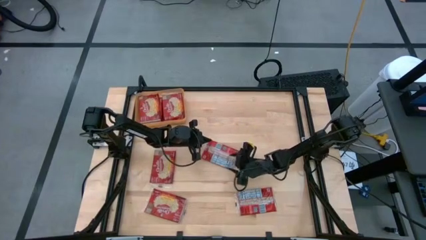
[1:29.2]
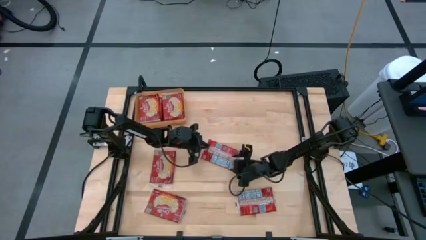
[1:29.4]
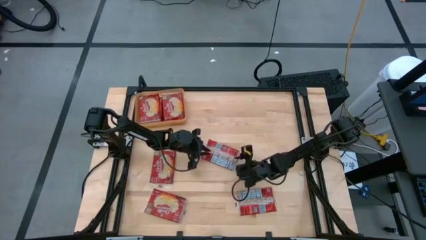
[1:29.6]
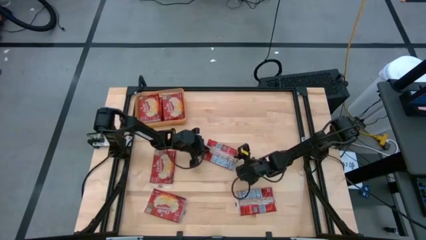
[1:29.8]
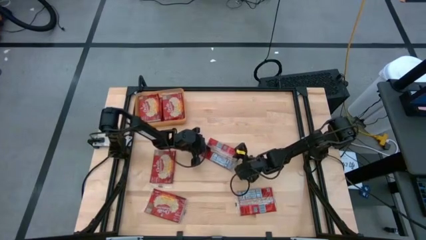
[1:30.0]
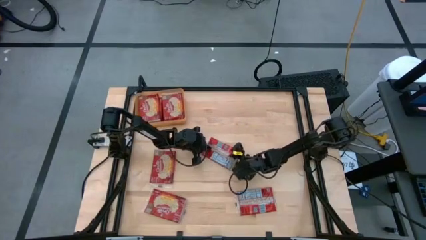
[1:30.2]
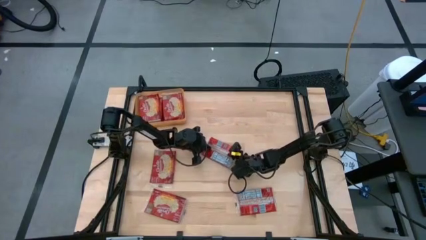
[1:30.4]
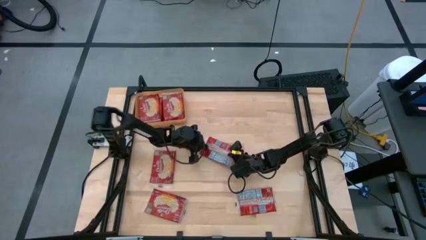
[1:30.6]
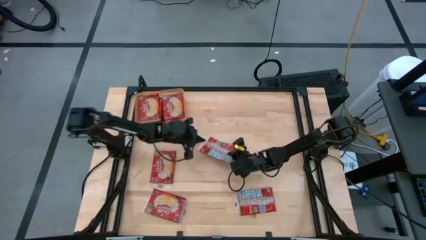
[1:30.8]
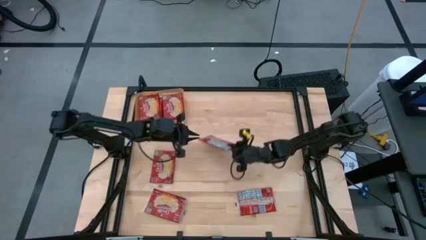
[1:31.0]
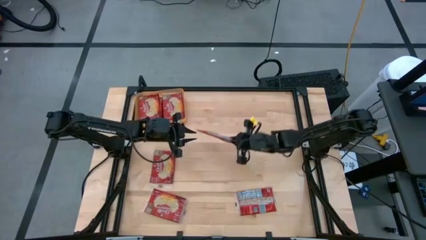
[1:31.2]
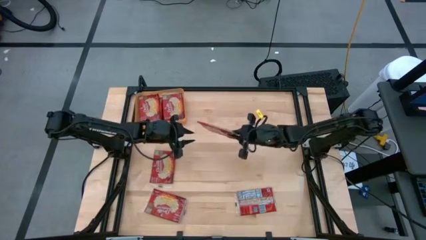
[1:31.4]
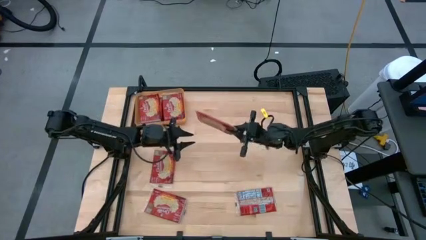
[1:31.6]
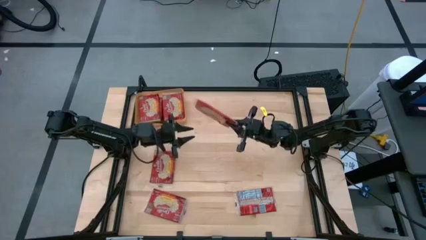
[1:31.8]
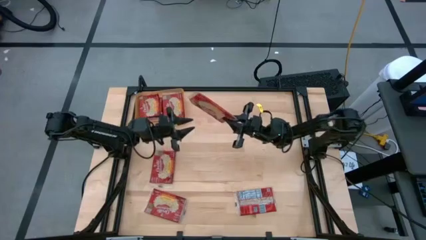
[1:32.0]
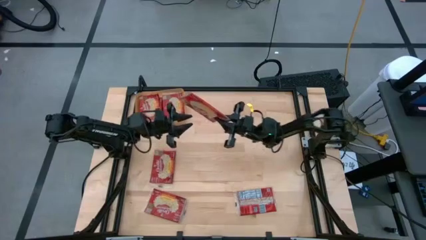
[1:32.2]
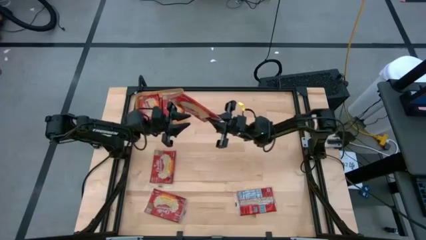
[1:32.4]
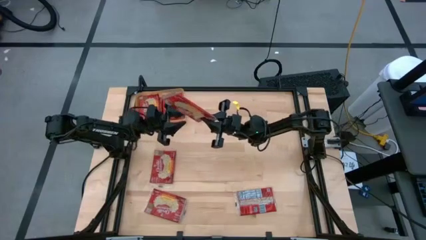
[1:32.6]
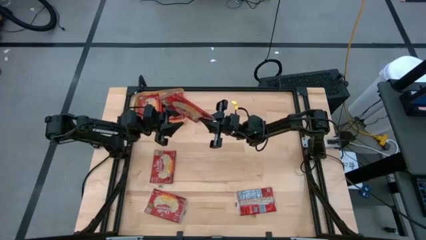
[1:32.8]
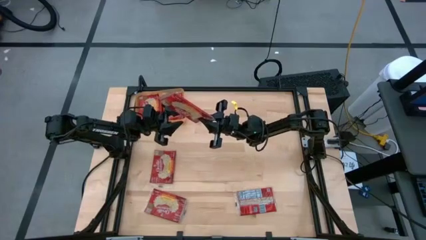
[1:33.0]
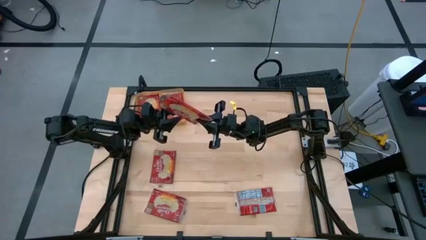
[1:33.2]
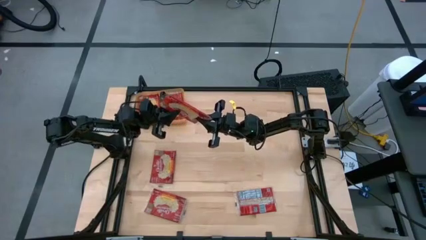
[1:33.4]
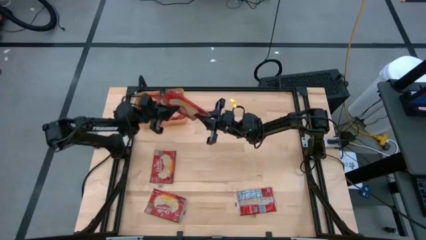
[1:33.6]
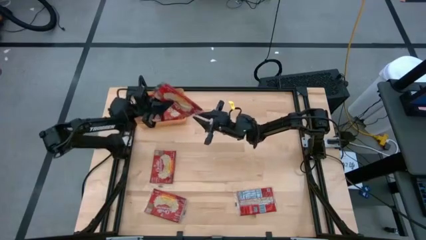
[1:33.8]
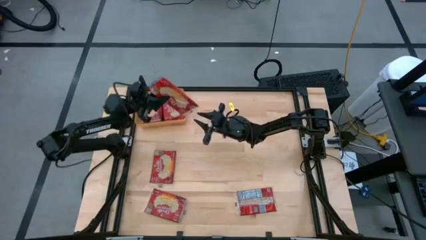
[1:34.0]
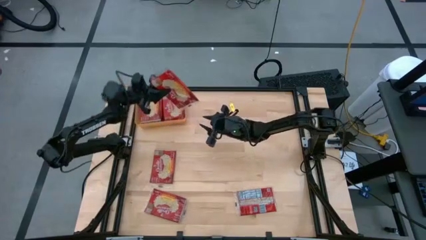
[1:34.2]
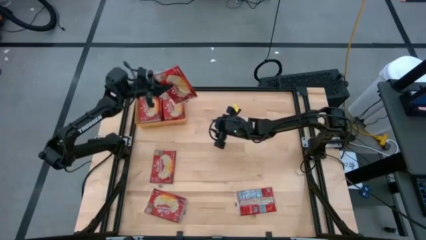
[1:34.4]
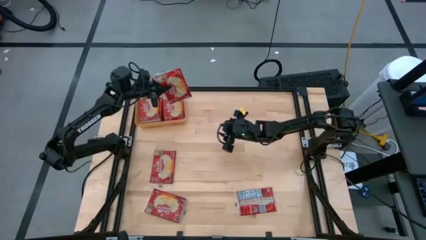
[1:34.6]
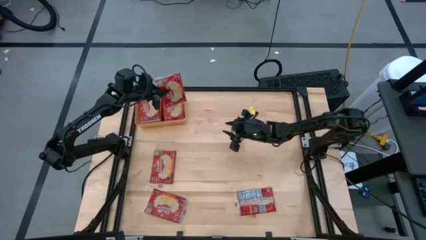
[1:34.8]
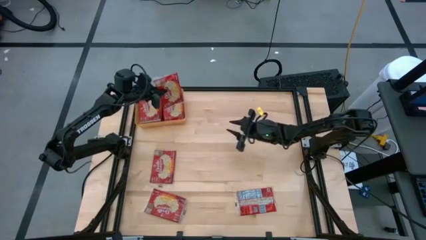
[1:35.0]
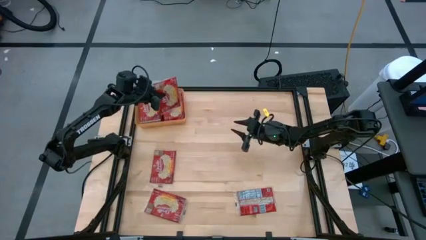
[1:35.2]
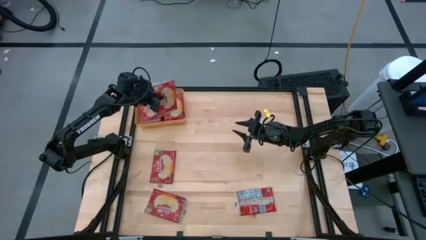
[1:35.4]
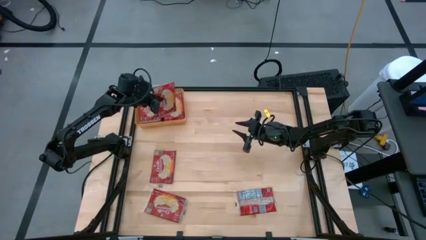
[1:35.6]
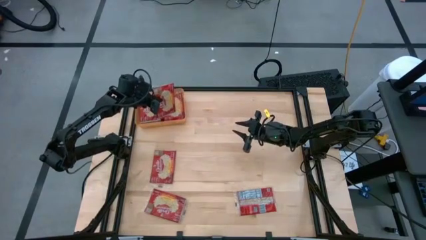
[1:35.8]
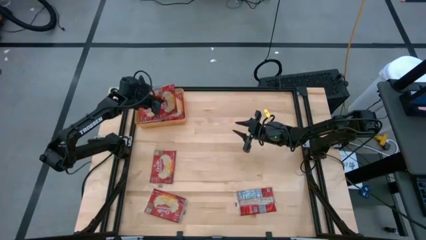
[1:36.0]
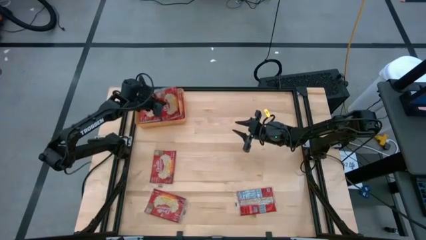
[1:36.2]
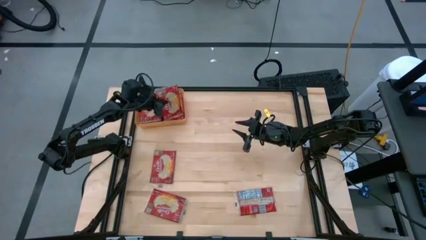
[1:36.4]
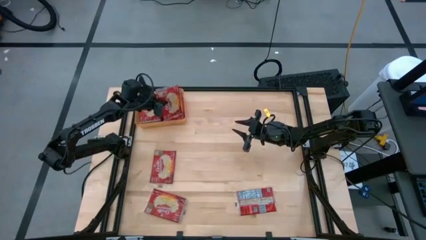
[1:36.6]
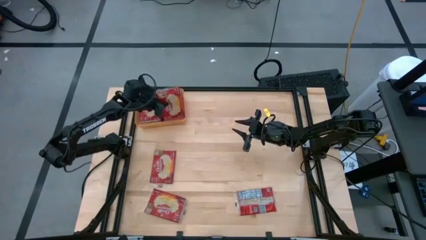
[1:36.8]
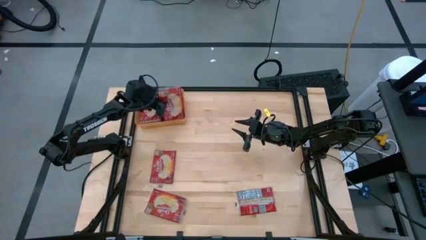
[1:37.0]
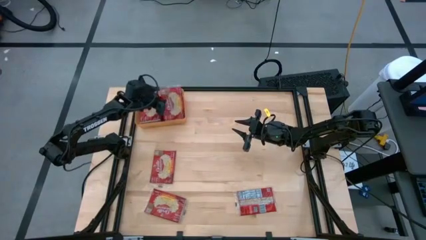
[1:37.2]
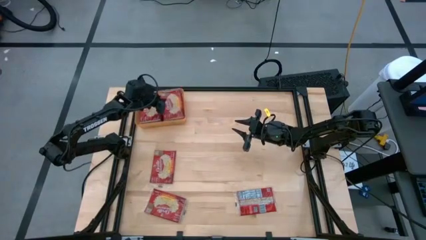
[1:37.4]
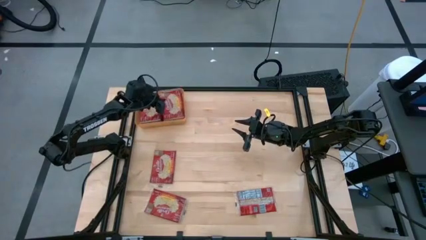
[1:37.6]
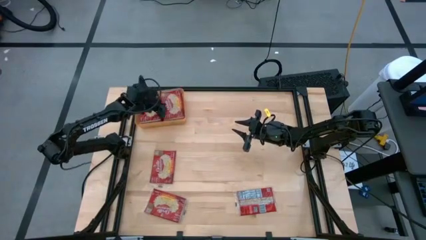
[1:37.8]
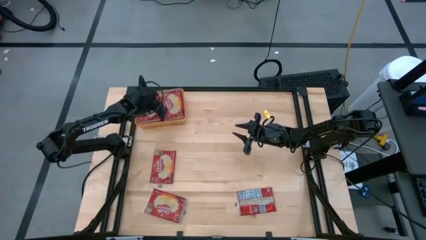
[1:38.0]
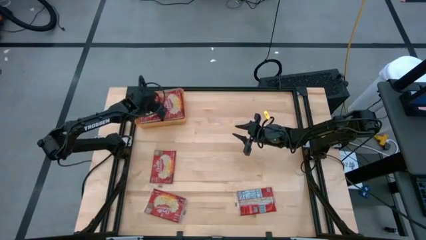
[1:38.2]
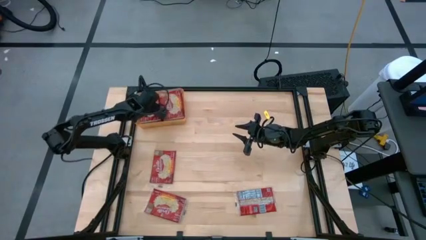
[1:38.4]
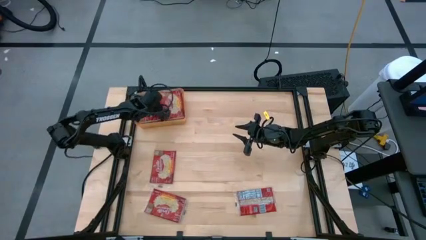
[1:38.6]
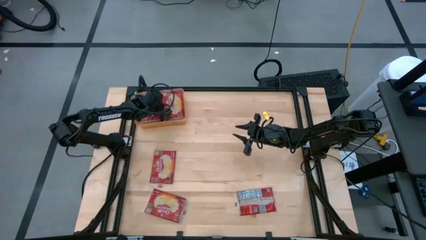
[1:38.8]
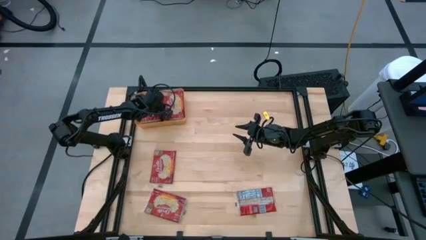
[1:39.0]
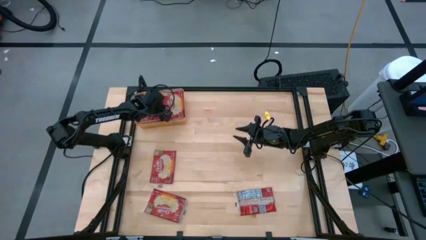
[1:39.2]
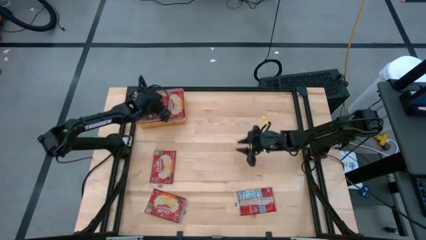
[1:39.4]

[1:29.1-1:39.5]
Task: Sort popcorn bags into baskets
Put the red popcorn bag into the orange bin

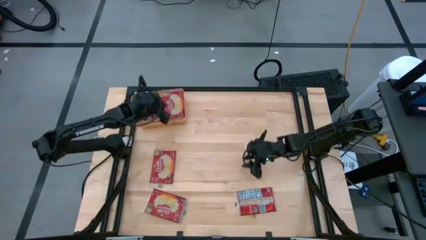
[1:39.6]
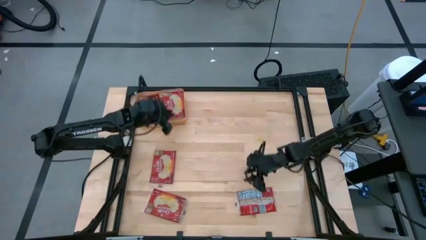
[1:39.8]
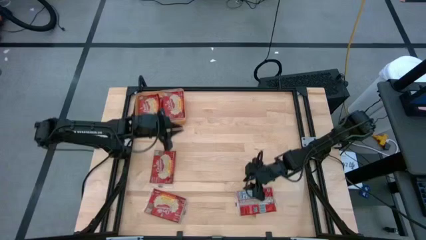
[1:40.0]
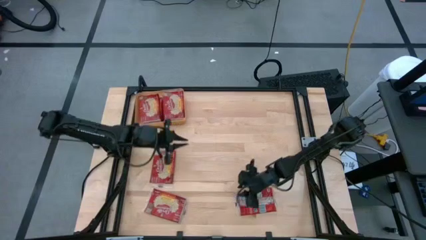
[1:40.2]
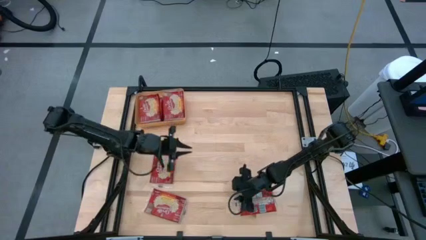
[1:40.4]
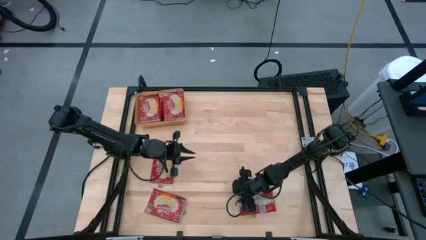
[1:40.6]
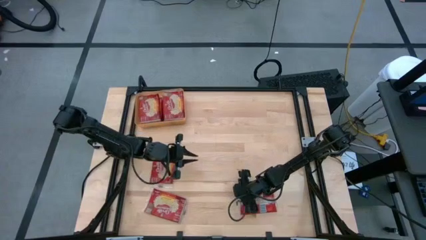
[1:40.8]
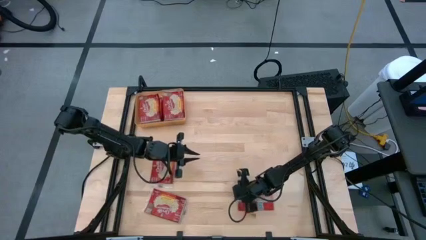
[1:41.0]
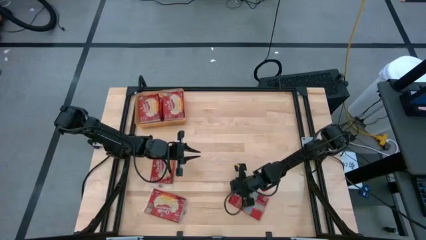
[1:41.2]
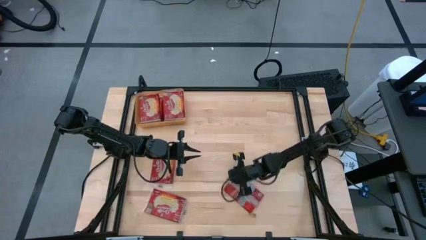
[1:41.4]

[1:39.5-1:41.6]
Put the red popcorn bag into the orange bin
